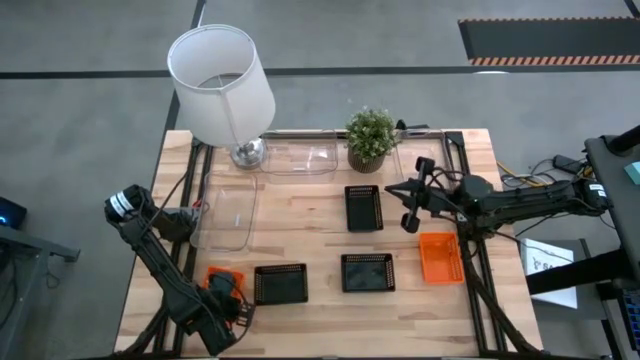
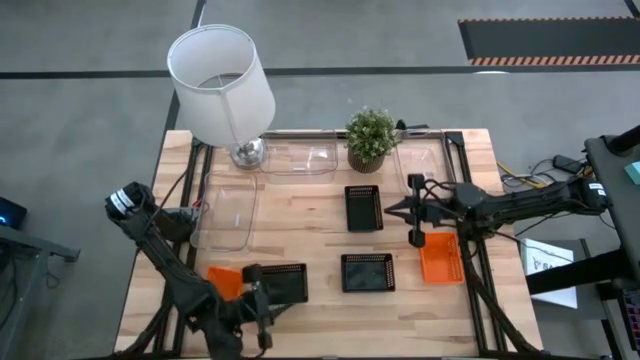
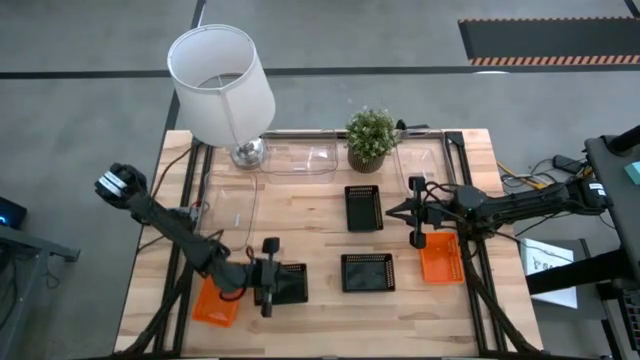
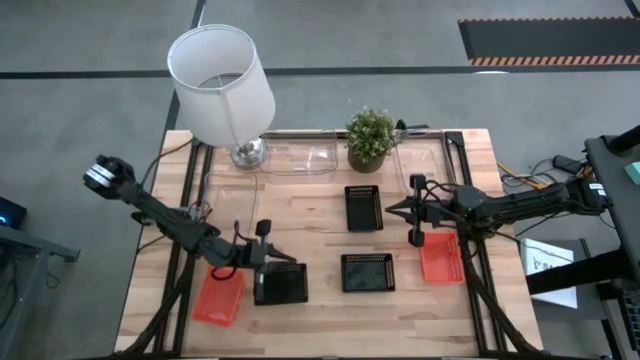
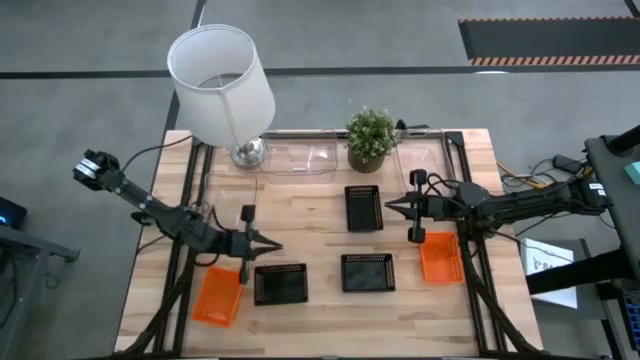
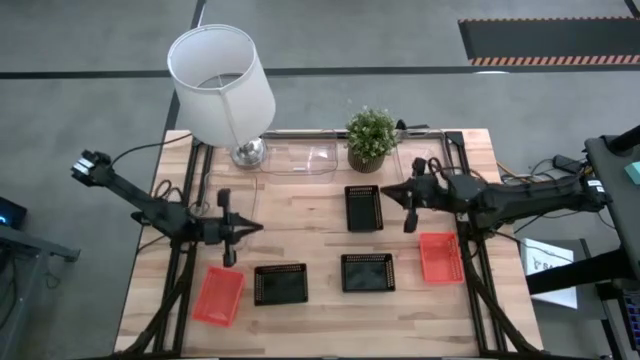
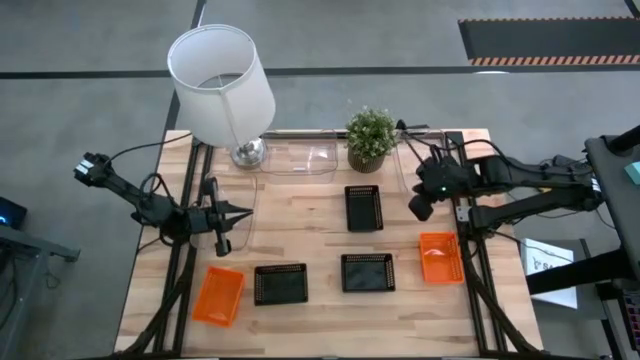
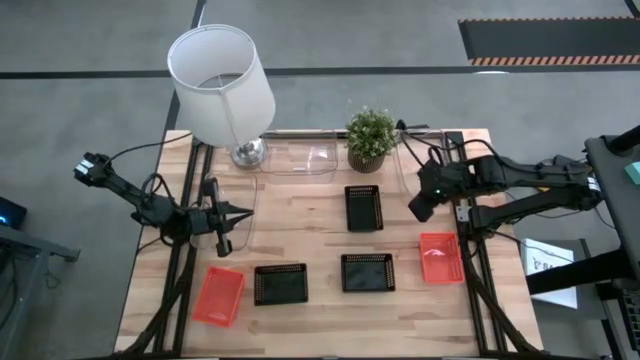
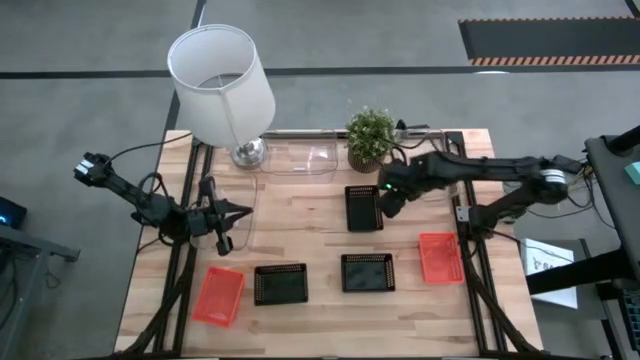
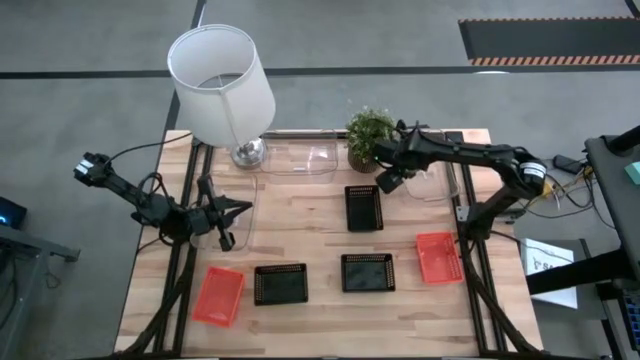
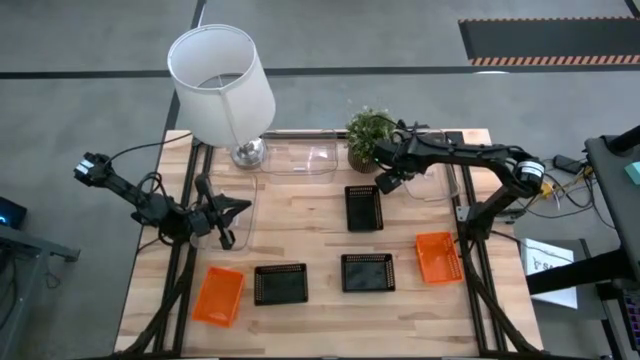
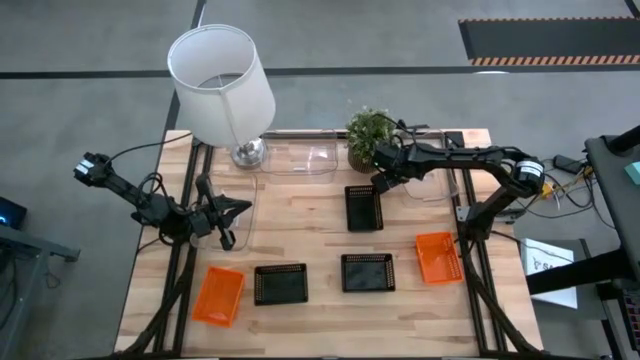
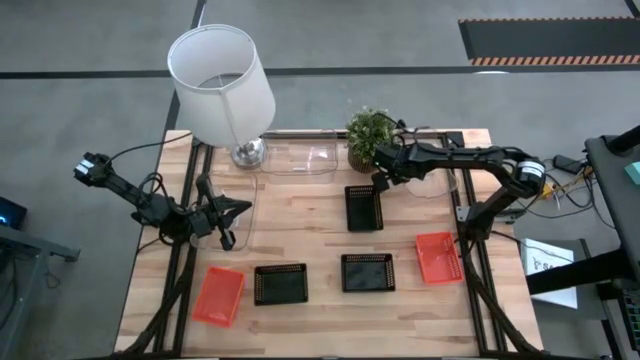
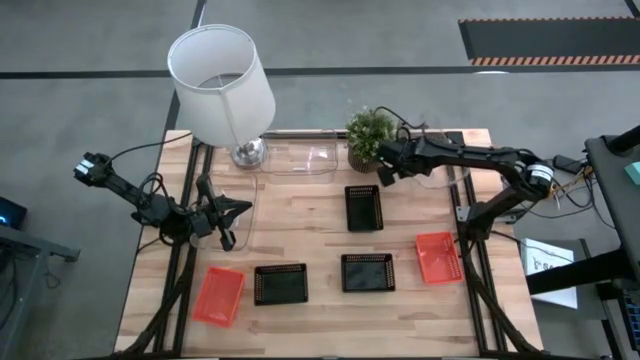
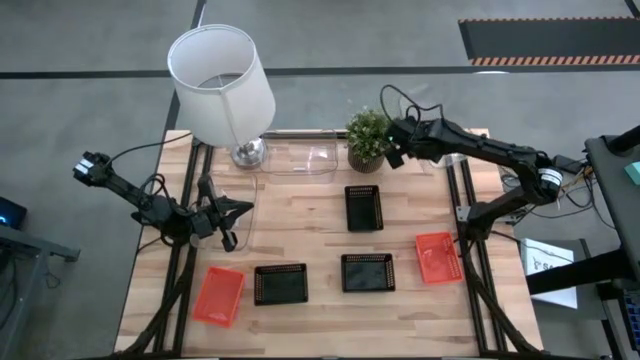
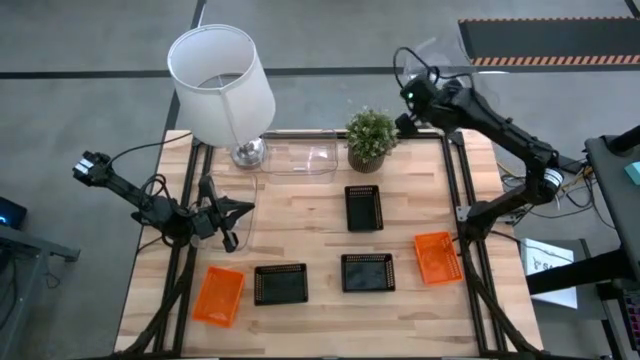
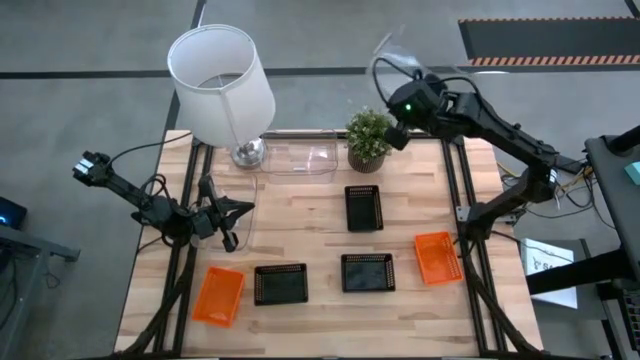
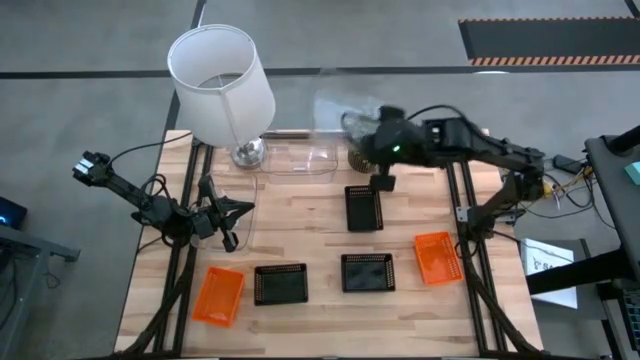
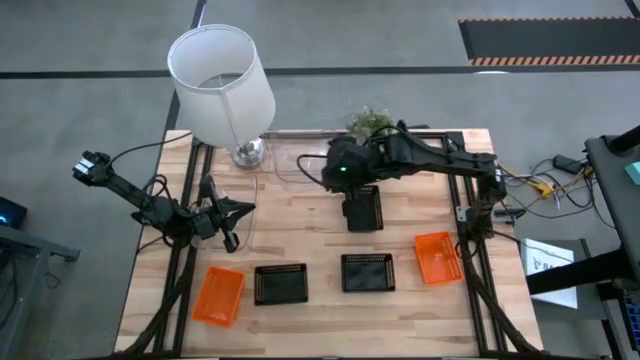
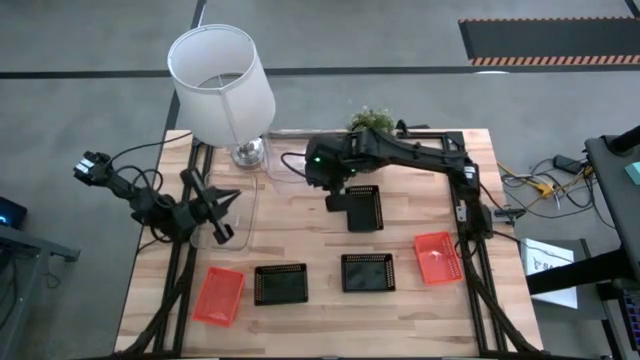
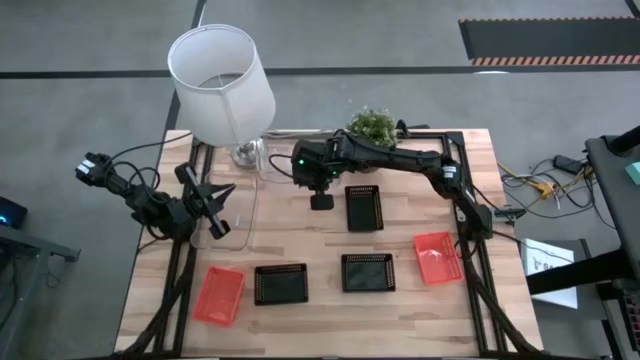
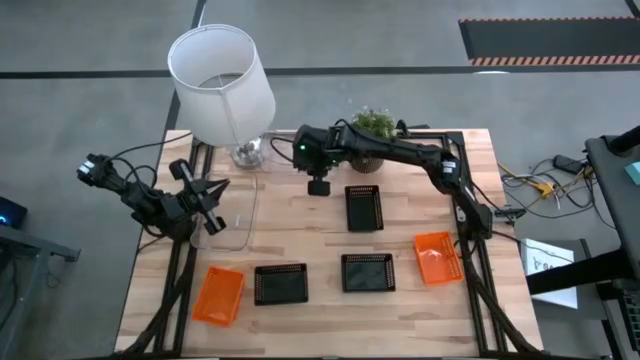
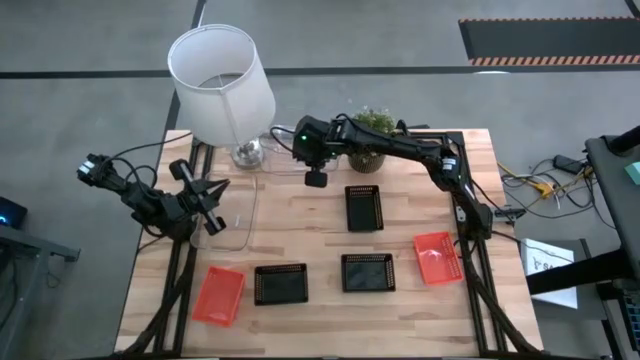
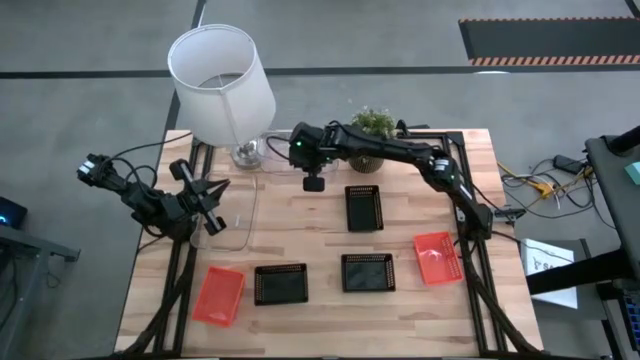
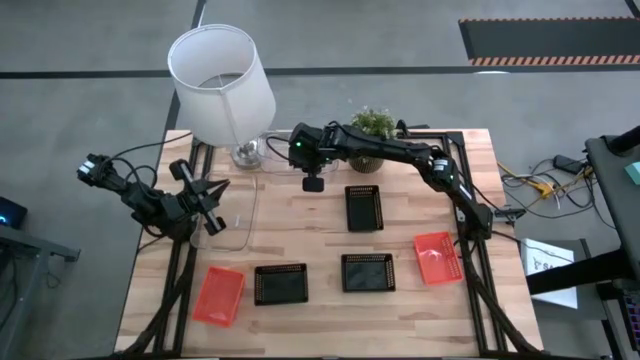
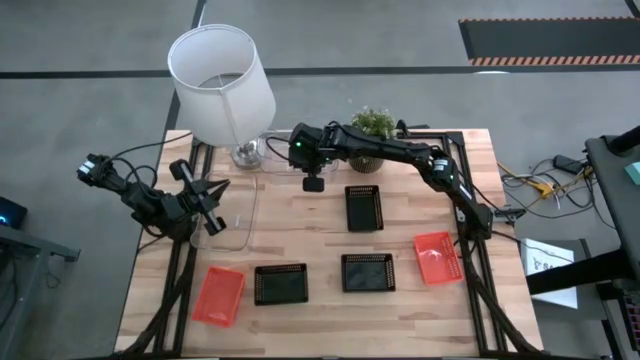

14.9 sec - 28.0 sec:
Stack the top right transparent bin on the top left transparent bin

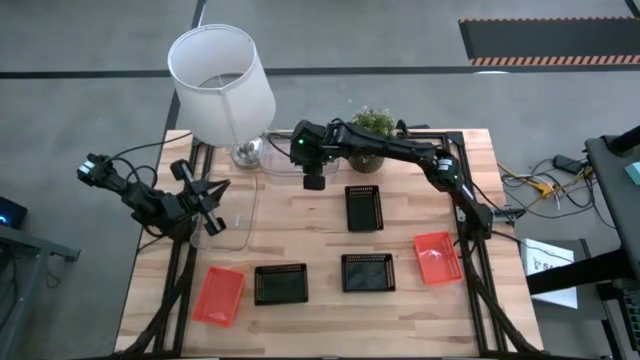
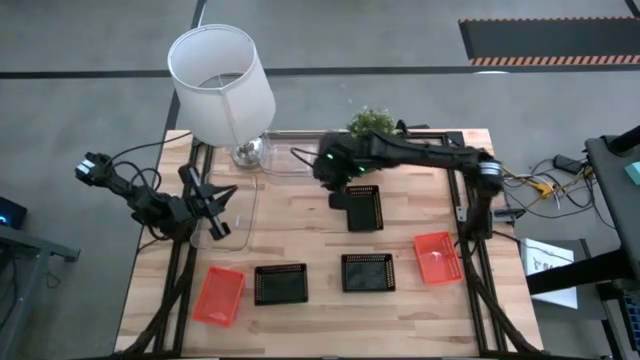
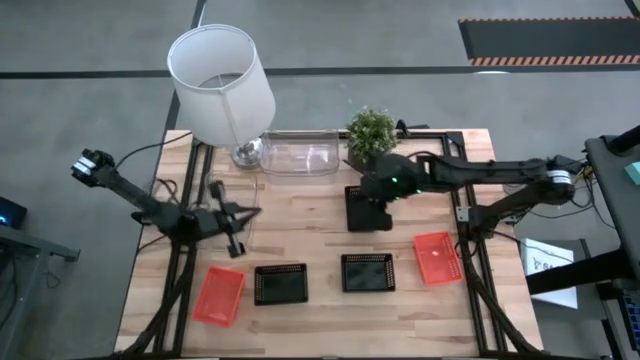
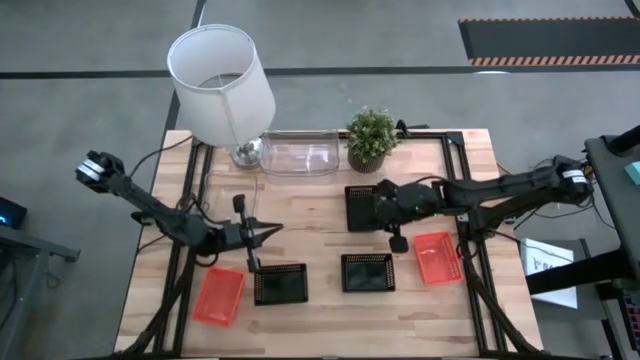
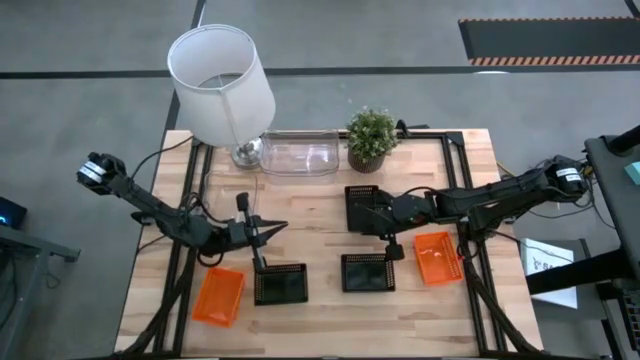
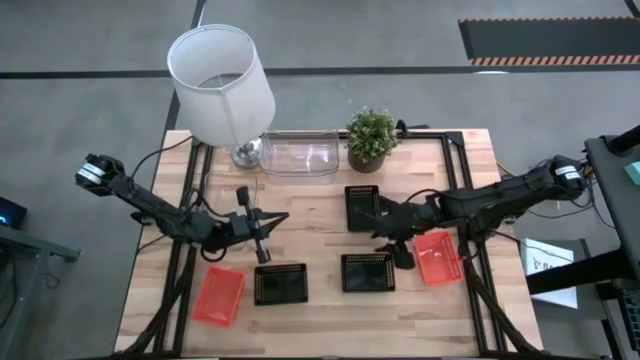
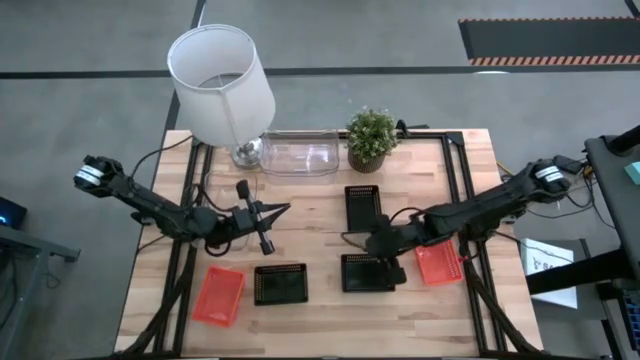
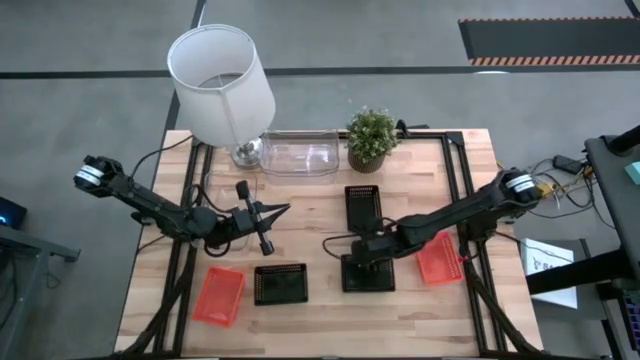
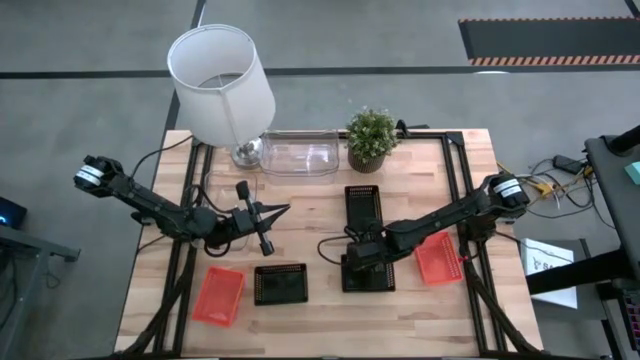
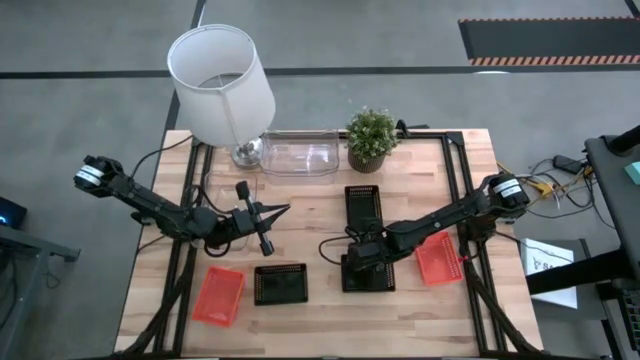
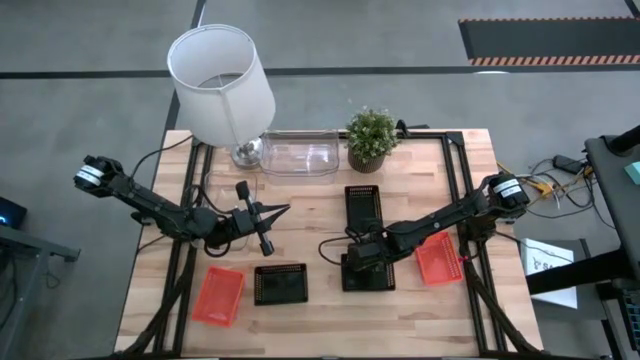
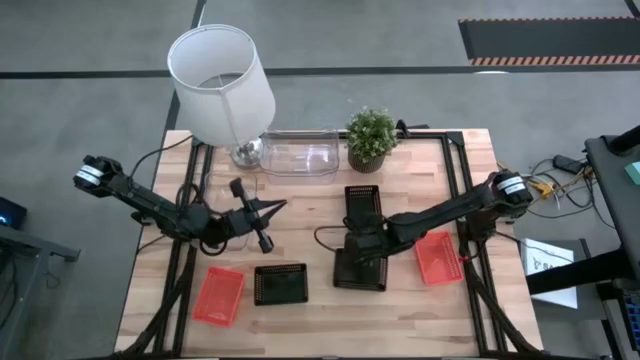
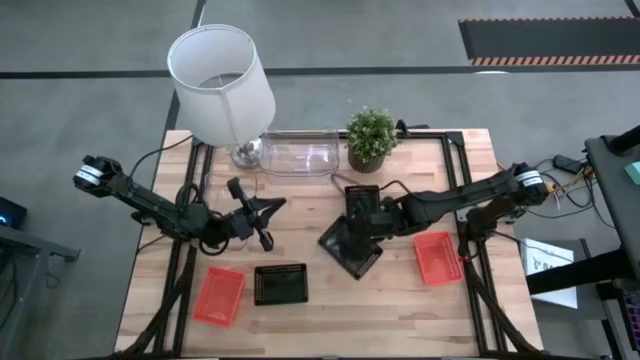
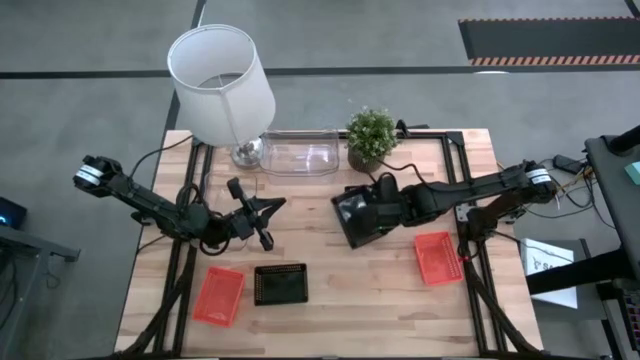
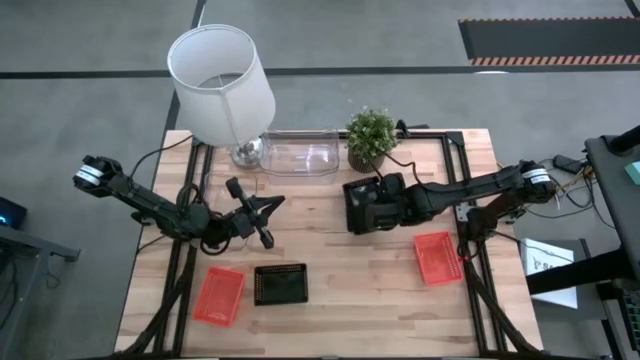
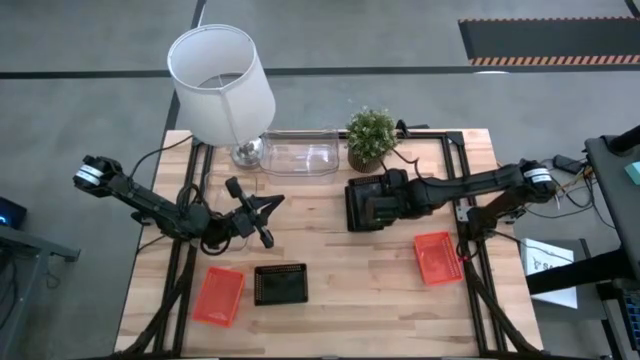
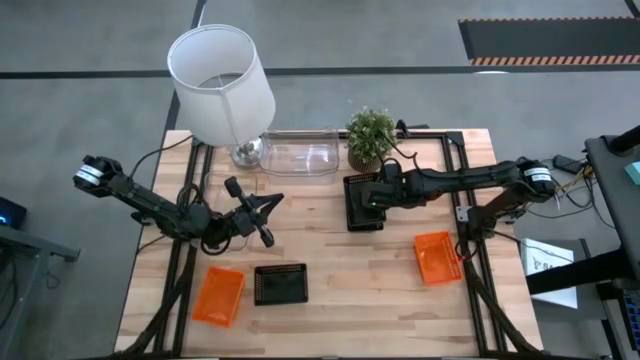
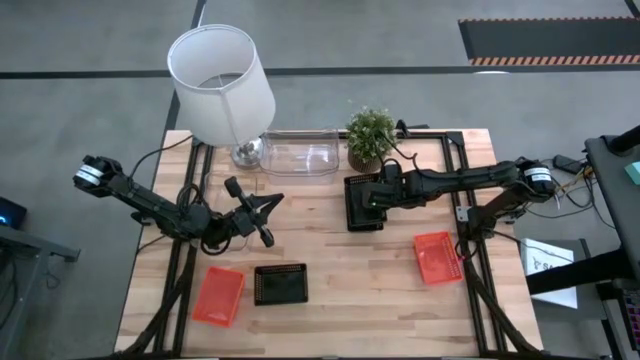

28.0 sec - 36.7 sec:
Stack the bottom right black bin on the top black bin
